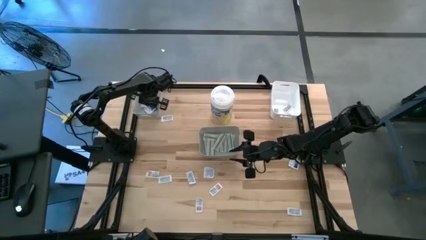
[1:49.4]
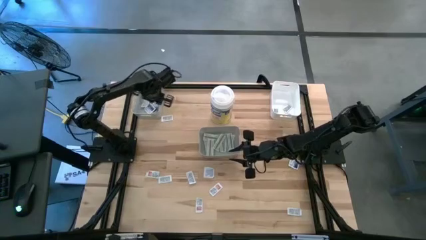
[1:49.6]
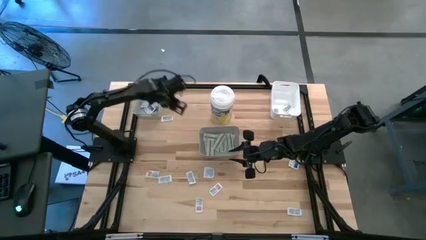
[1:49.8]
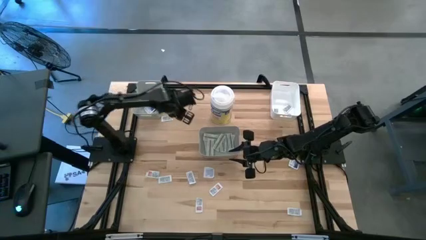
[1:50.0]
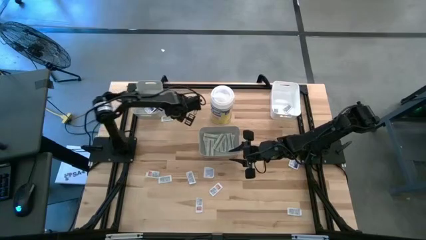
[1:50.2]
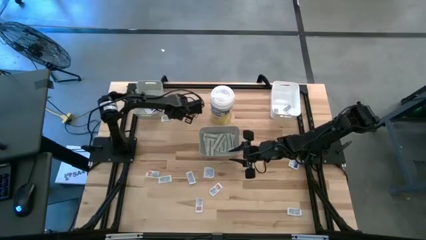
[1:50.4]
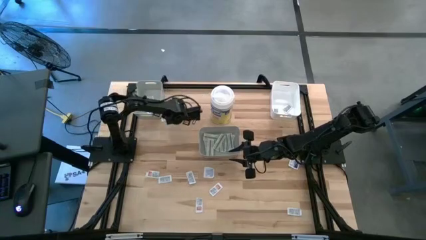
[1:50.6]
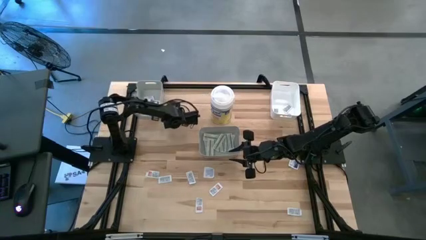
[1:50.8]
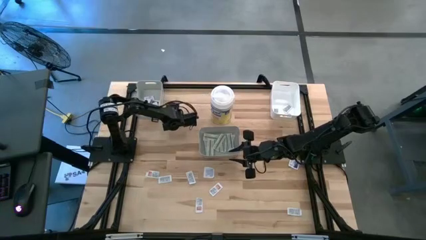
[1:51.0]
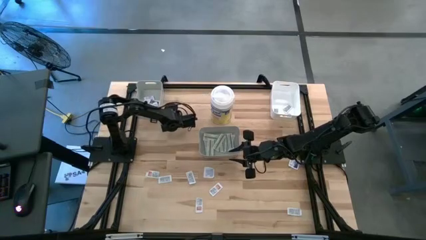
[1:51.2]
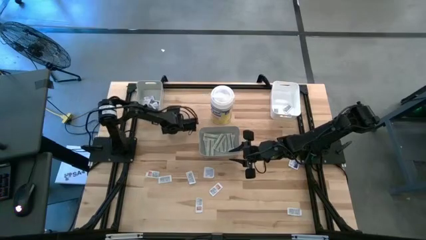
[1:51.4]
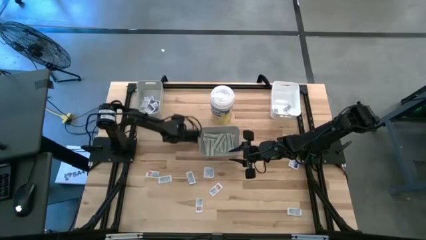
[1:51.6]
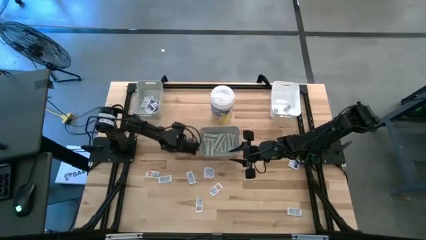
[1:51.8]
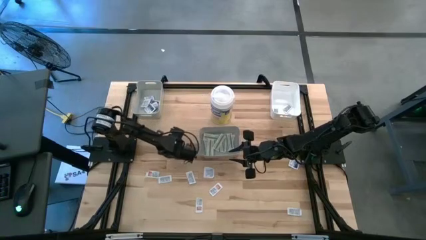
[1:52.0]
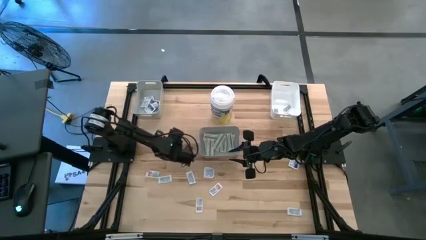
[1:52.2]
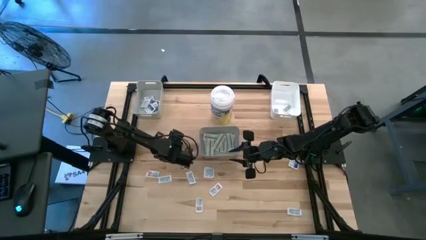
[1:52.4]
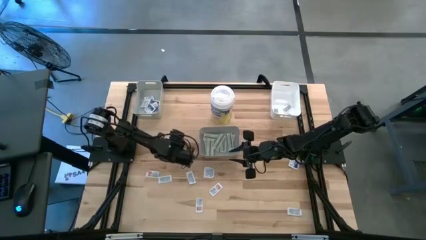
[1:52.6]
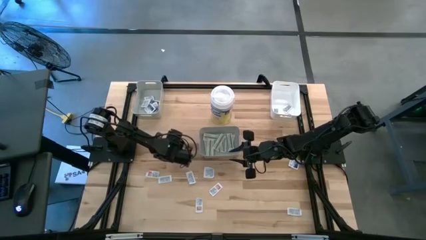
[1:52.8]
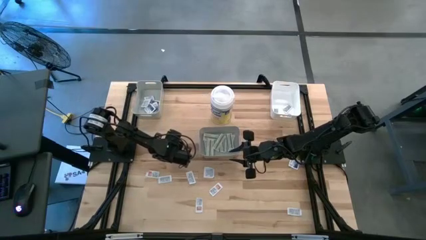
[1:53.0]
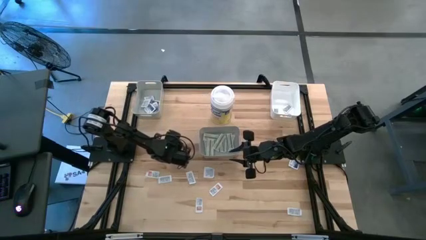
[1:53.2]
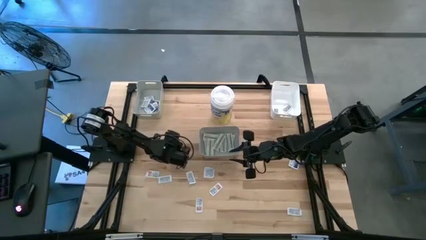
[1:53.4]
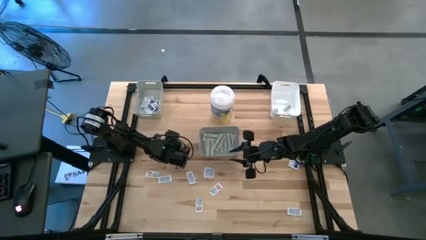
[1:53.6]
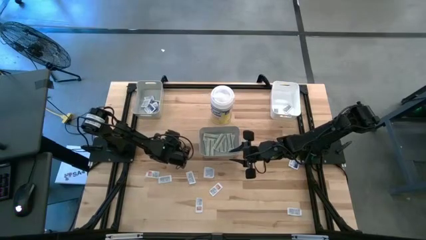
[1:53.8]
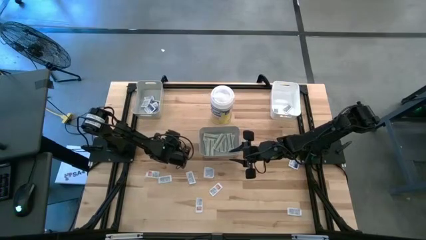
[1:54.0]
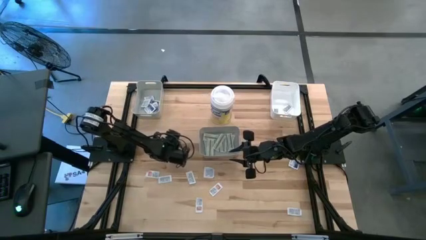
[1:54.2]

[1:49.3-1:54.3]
Task: Pick & Place First Aid Supplies
Put the ointment pack into the white bin

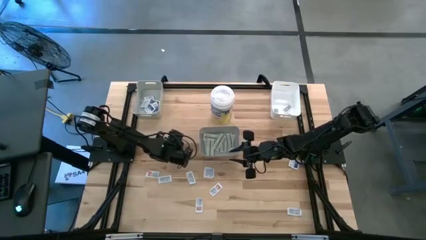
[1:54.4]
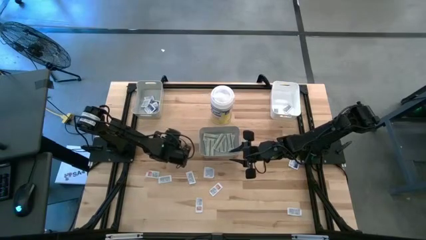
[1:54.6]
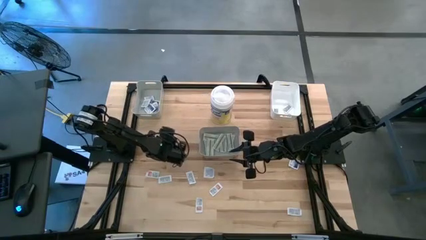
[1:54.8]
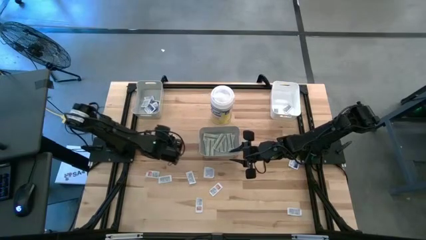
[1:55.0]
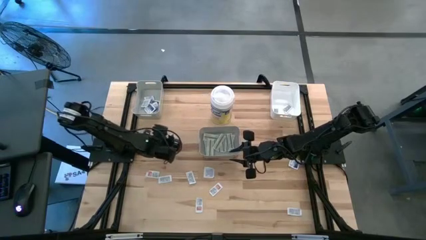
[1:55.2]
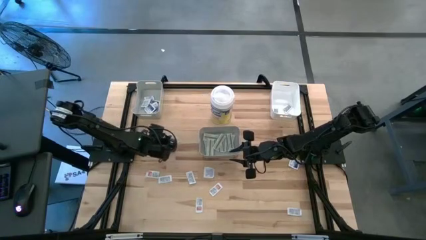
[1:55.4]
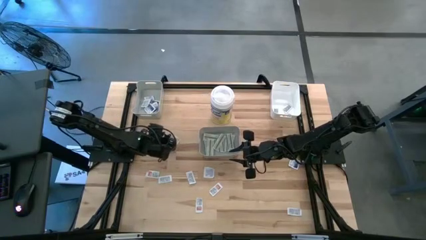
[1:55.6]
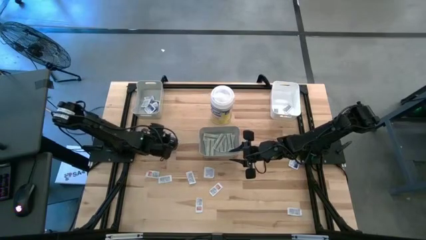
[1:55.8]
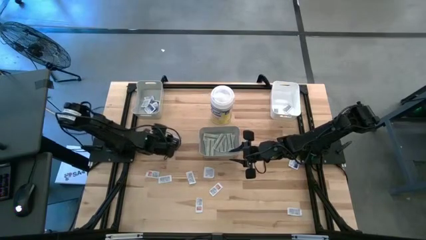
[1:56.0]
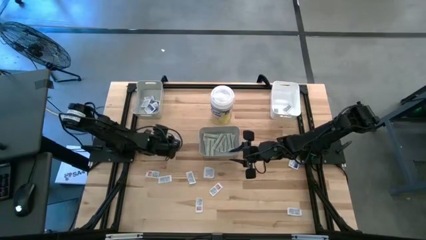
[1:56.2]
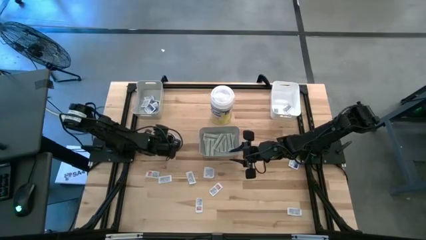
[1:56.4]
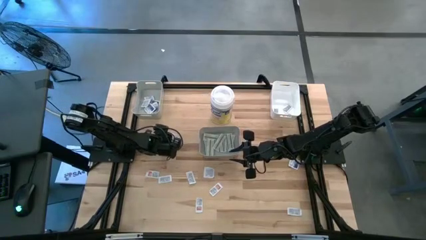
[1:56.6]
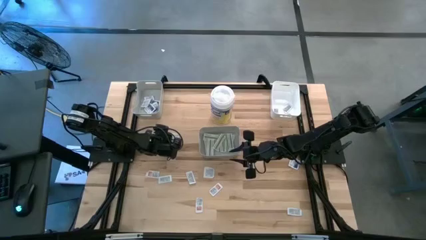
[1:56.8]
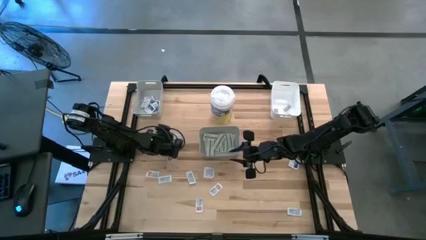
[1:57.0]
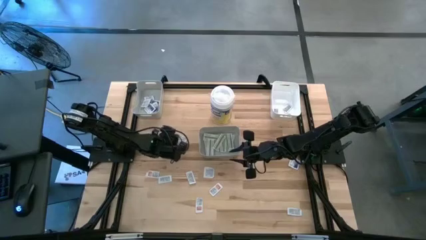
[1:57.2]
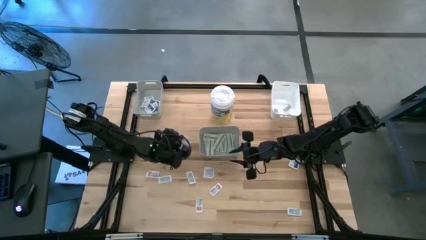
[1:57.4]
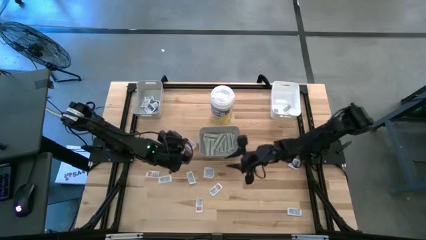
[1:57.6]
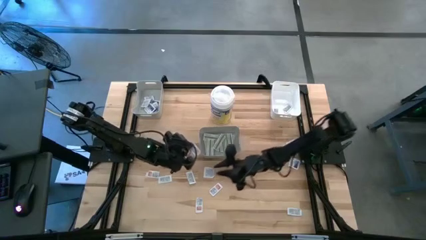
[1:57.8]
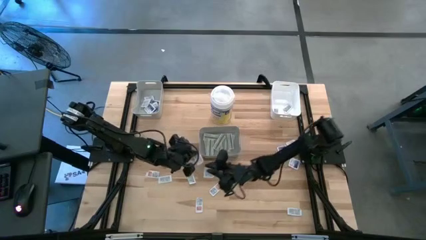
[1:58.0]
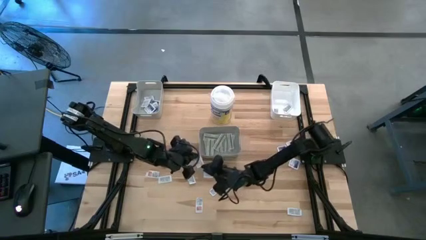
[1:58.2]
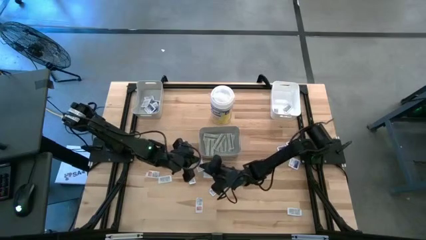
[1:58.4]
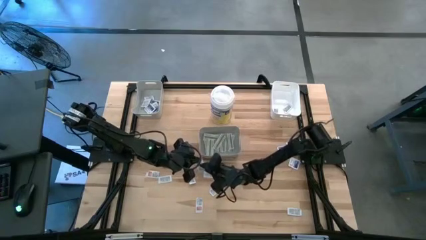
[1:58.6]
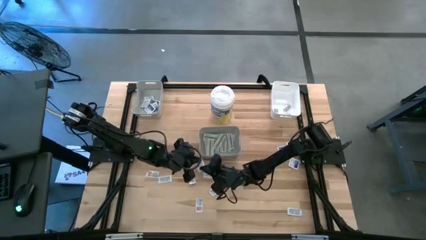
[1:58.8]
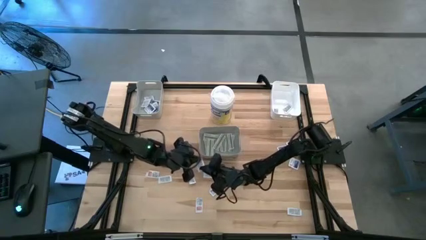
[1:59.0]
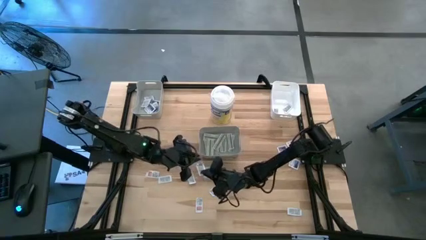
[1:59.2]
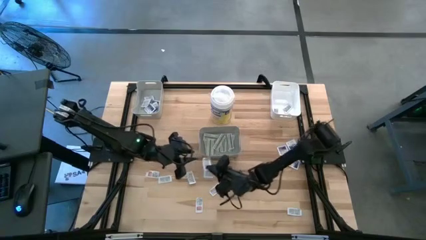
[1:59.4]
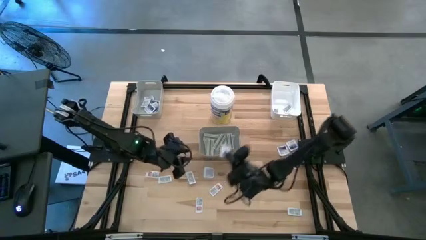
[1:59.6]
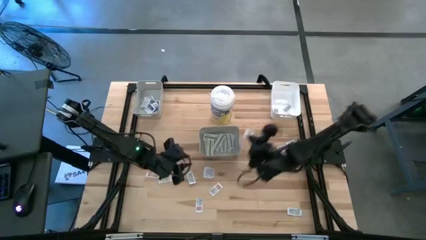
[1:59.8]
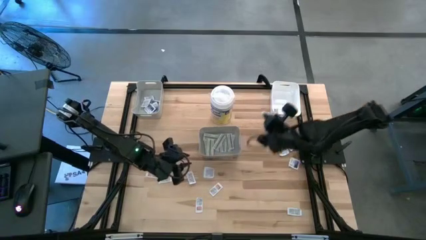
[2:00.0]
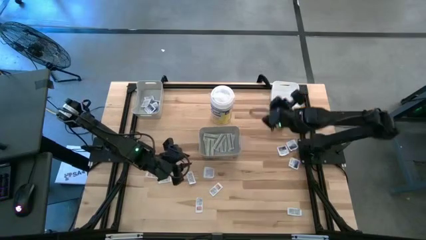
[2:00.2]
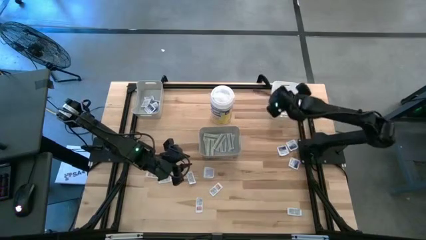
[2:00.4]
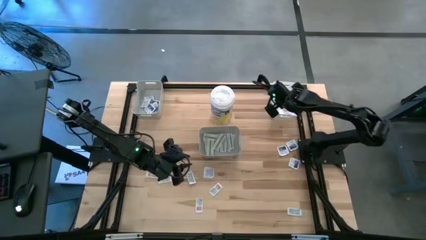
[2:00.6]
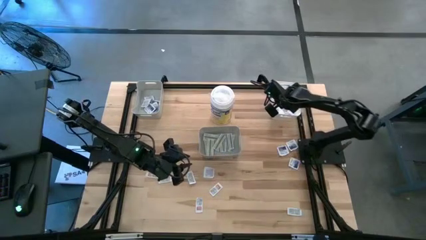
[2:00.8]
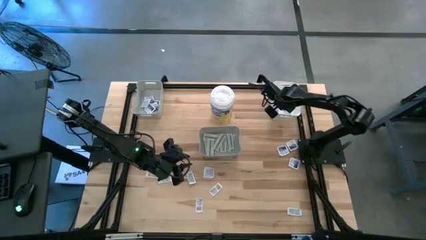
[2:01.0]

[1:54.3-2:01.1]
Put the ointment pack into the white bin
